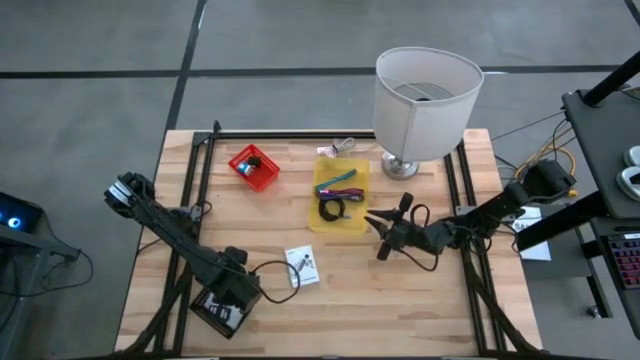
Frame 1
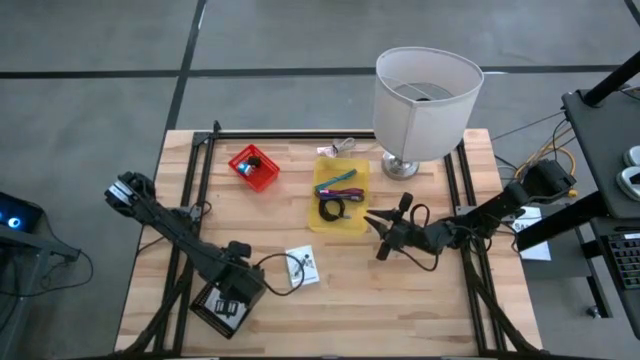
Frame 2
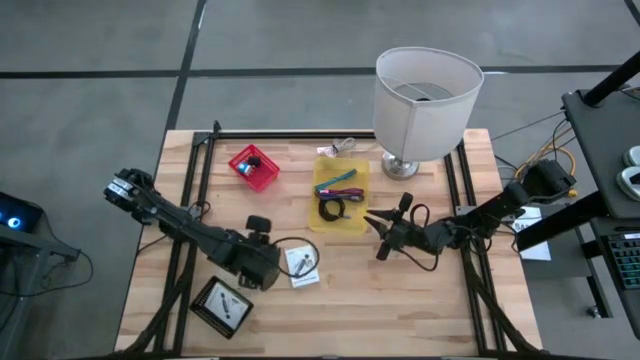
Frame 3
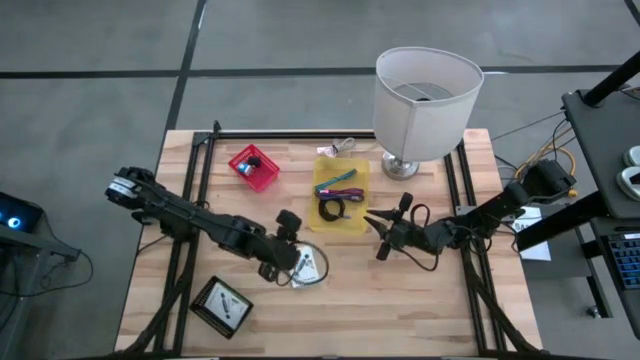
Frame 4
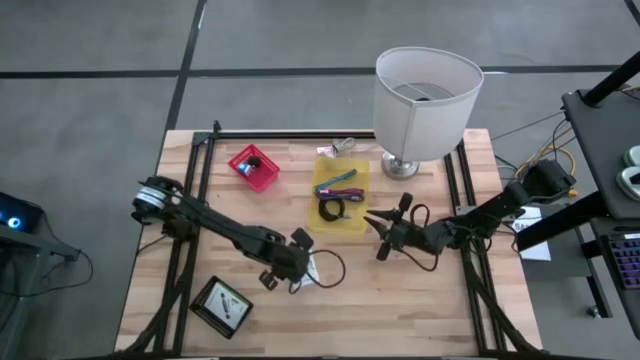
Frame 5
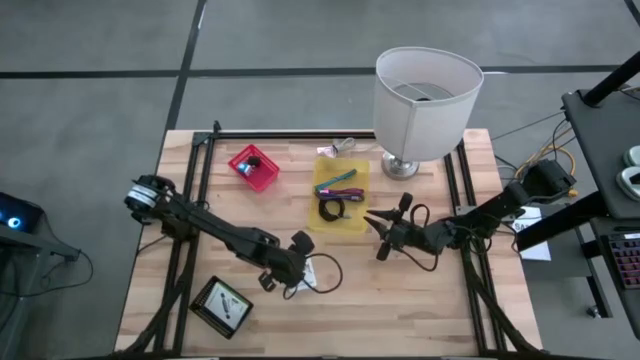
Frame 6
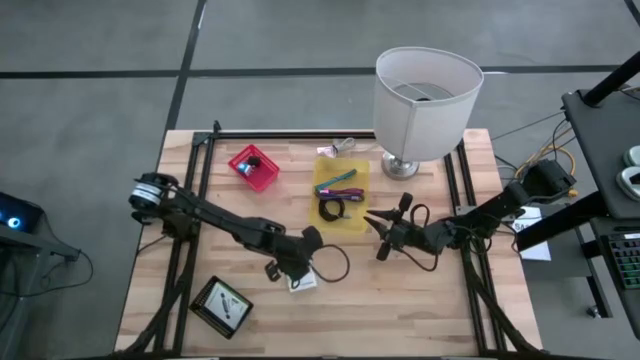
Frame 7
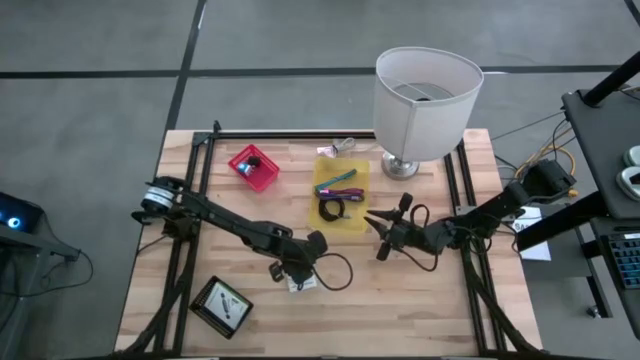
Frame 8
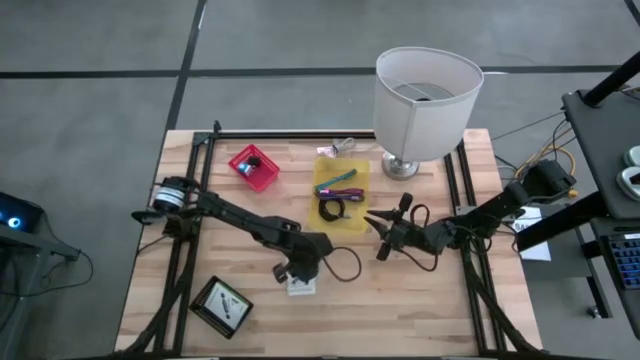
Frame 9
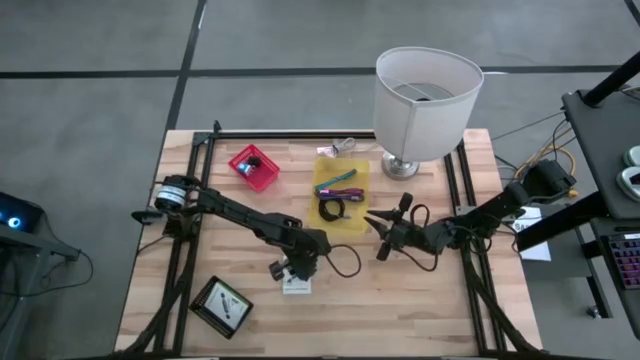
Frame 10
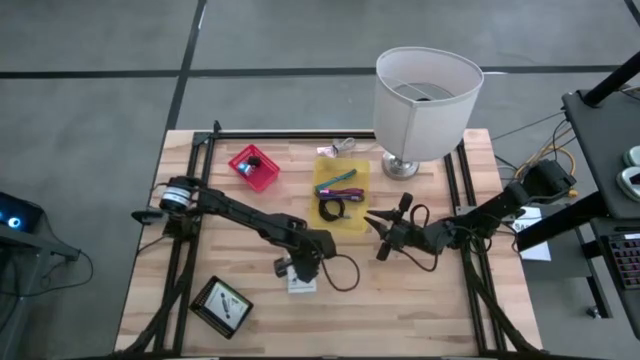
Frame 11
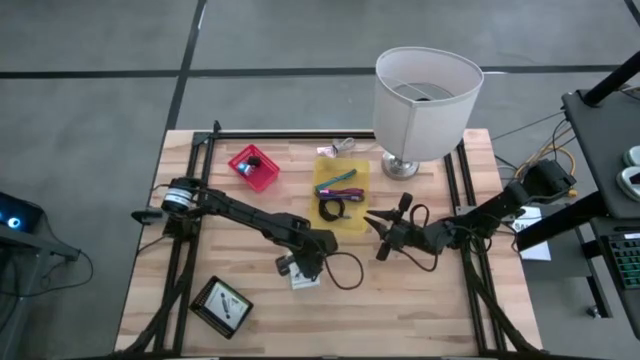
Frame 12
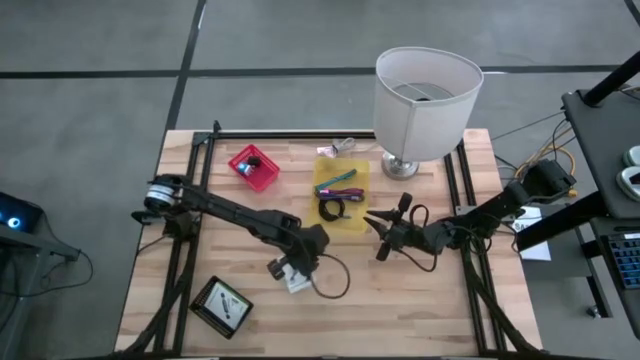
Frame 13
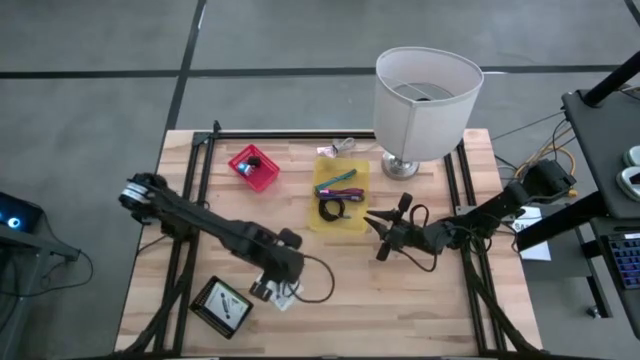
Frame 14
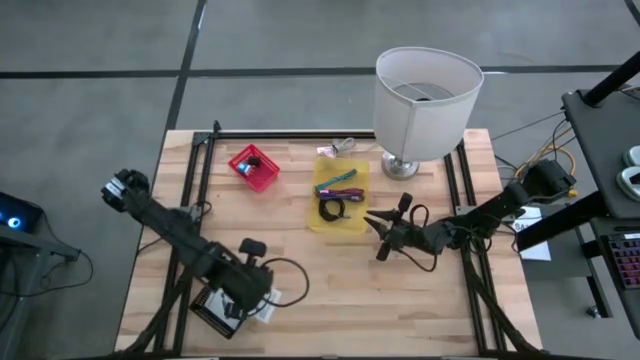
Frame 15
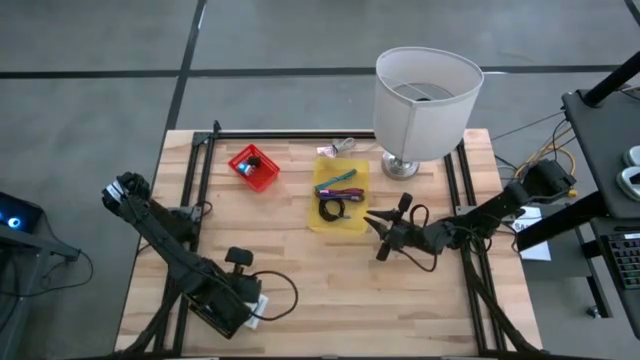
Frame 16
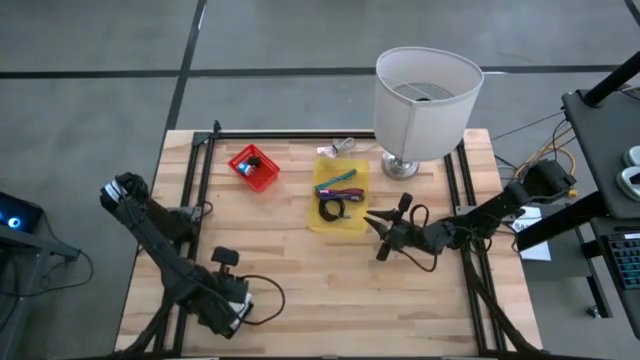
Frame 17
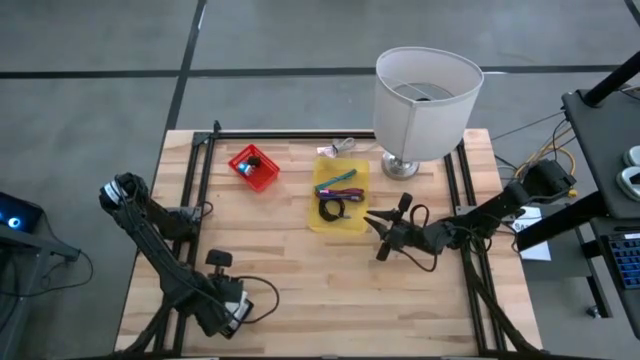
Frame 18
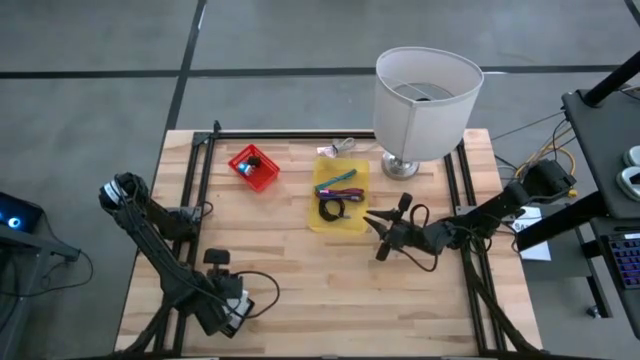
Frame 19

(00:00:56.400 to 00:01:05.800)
Task: Pick and place items into bin
Put the white card reader box into the black bin

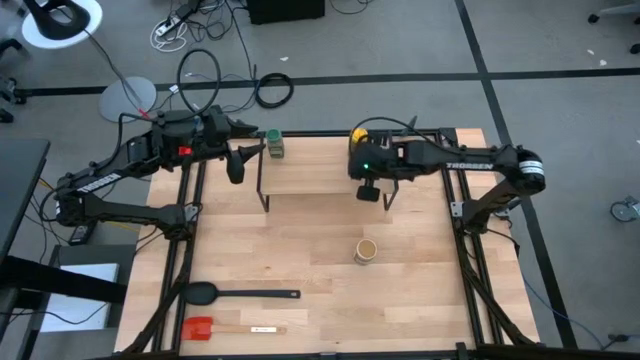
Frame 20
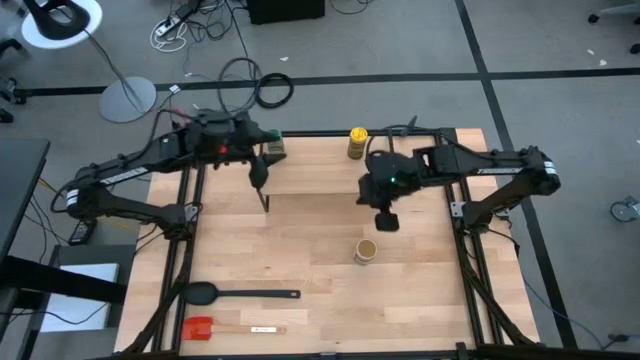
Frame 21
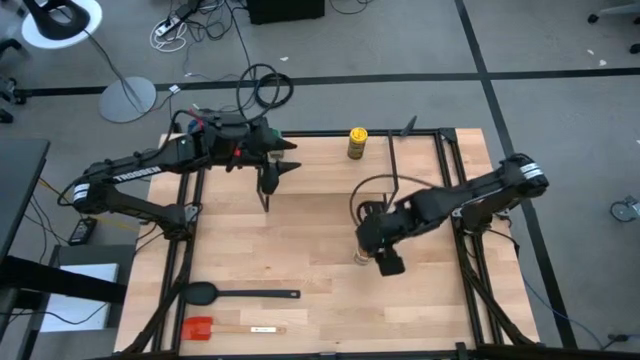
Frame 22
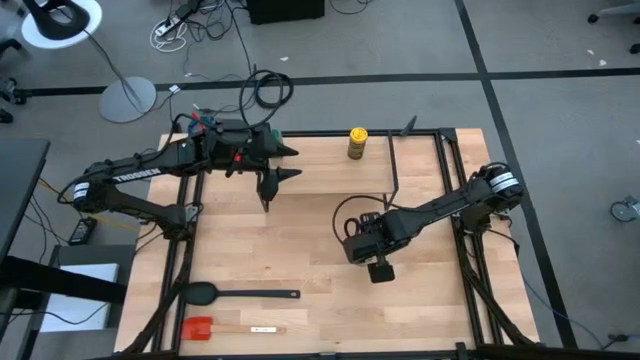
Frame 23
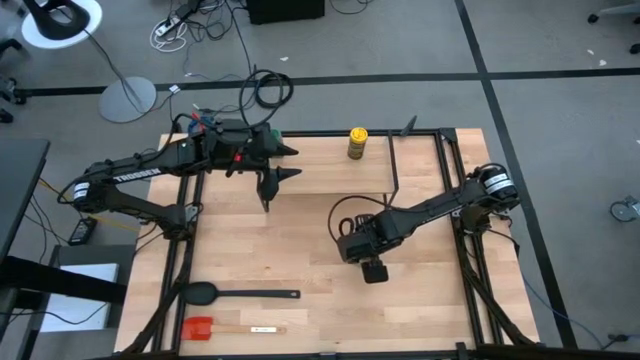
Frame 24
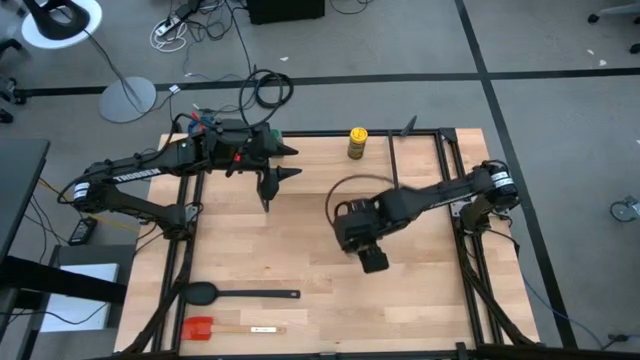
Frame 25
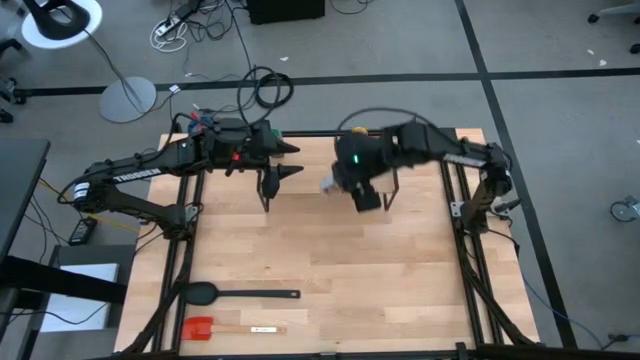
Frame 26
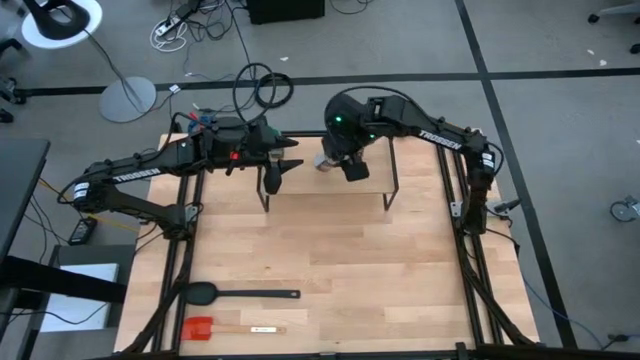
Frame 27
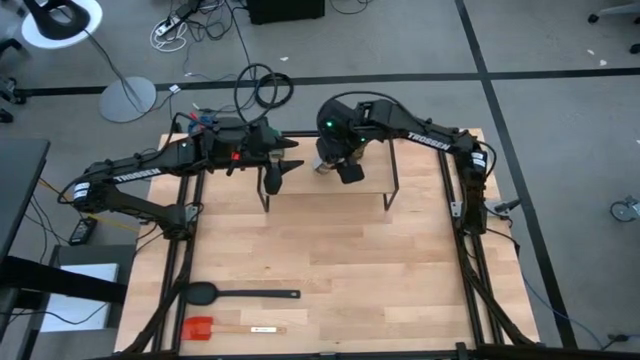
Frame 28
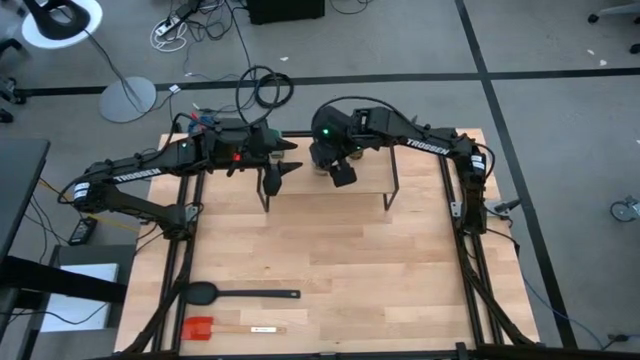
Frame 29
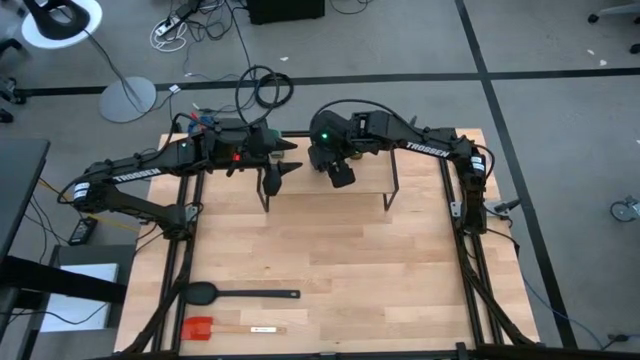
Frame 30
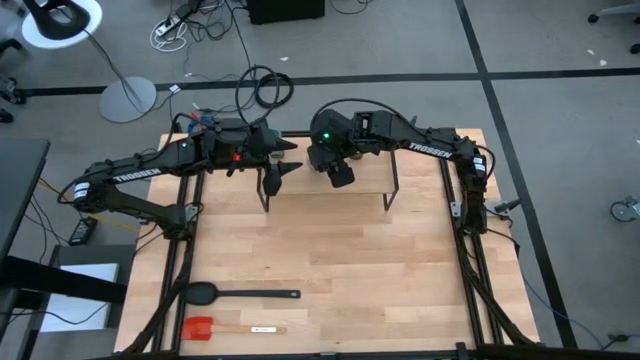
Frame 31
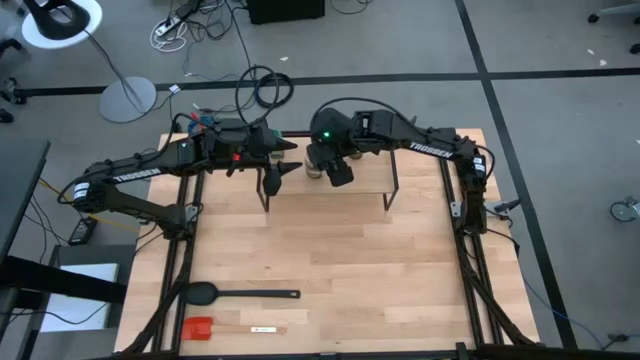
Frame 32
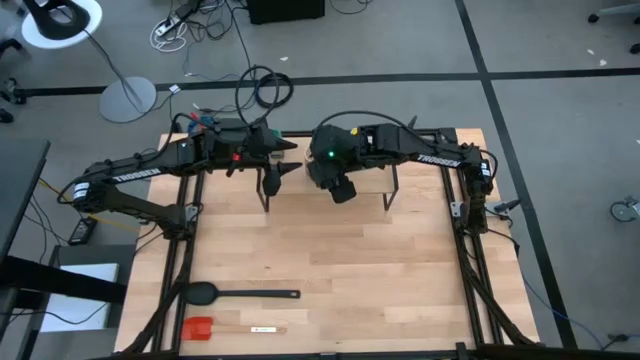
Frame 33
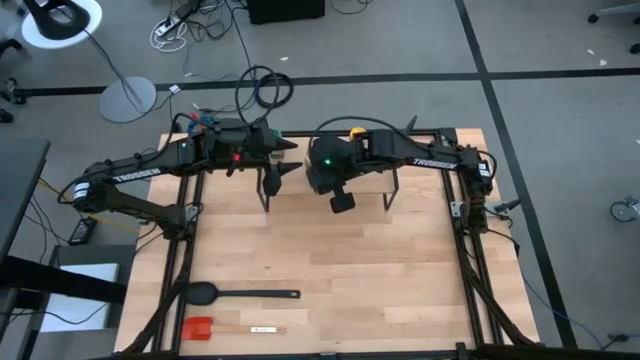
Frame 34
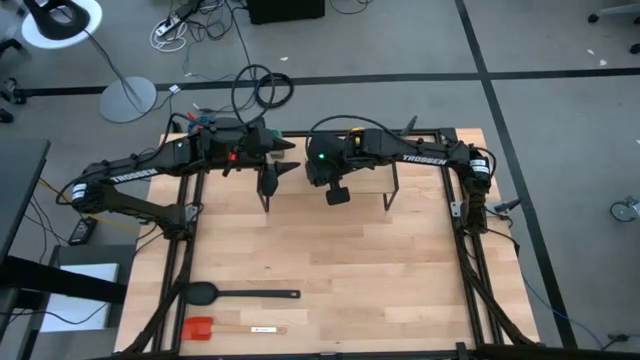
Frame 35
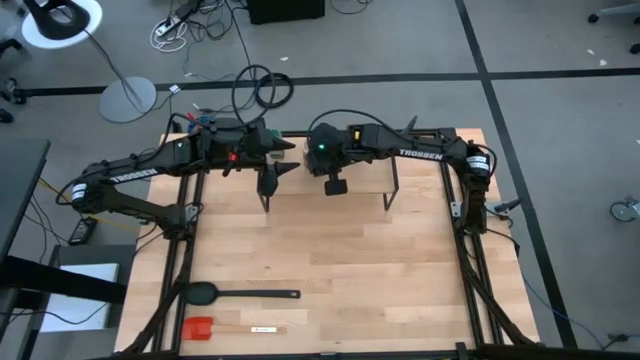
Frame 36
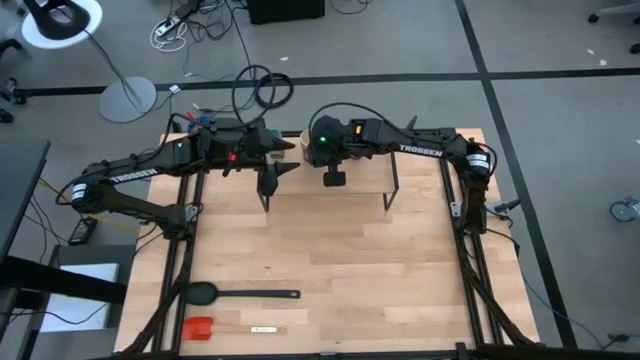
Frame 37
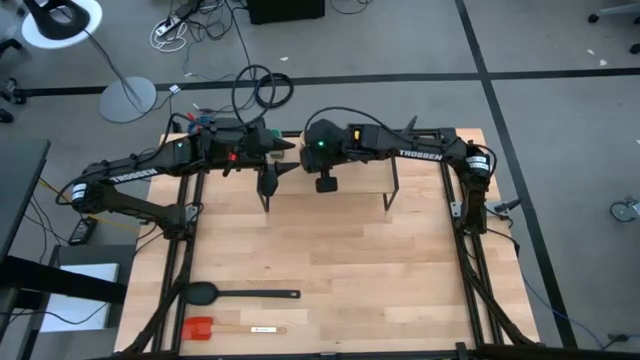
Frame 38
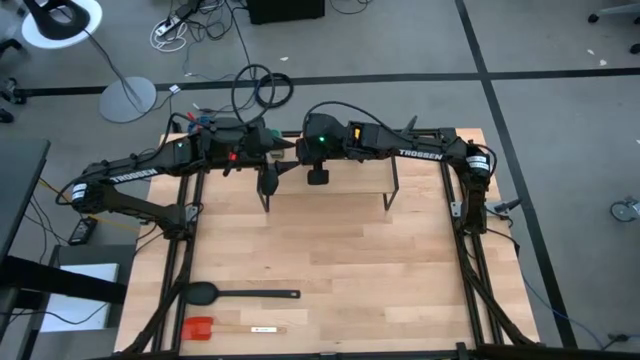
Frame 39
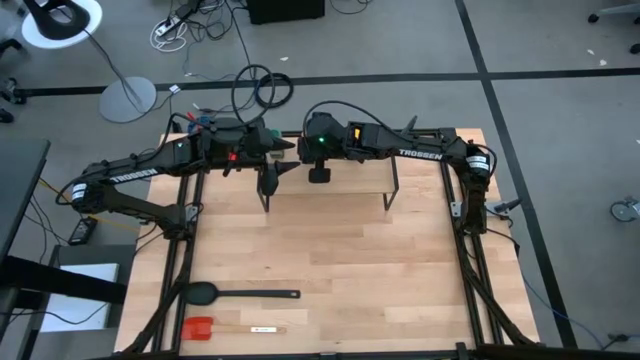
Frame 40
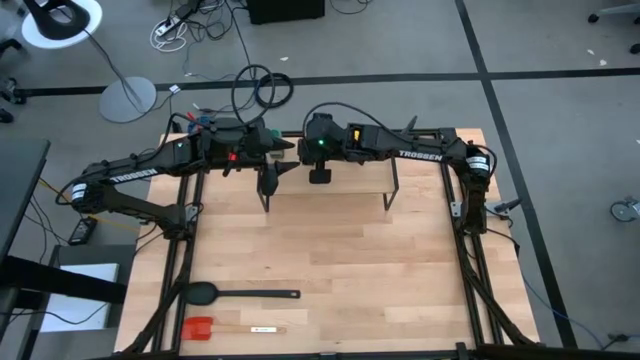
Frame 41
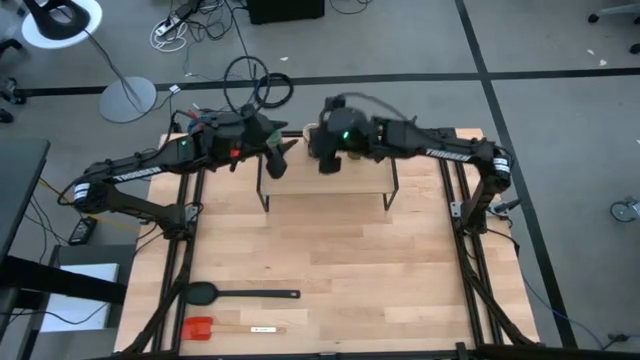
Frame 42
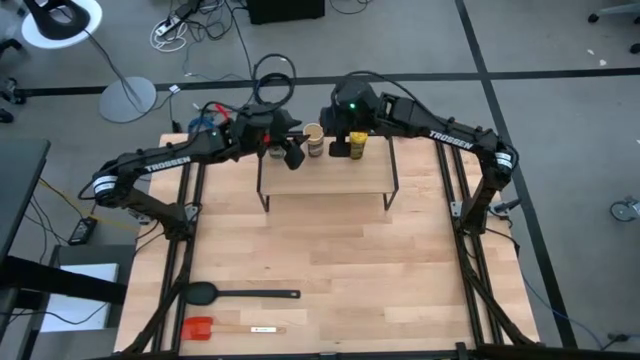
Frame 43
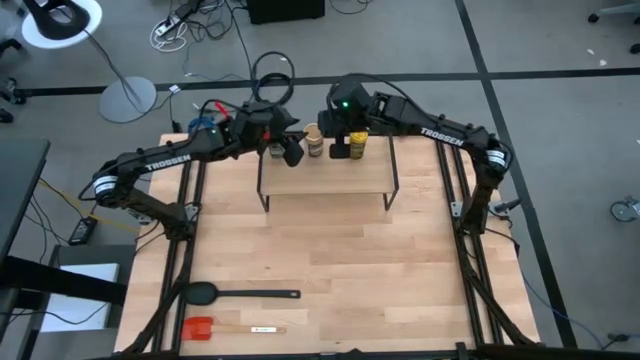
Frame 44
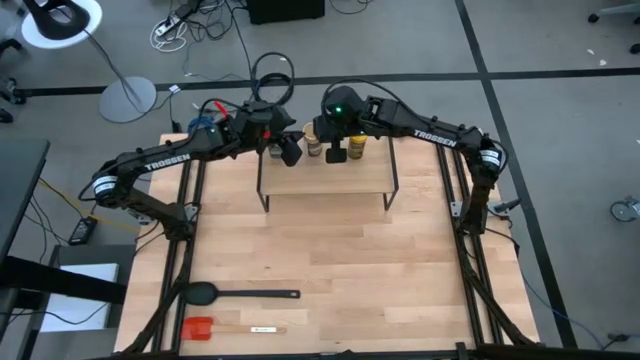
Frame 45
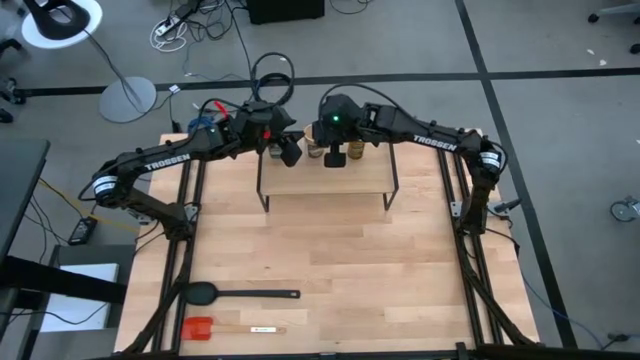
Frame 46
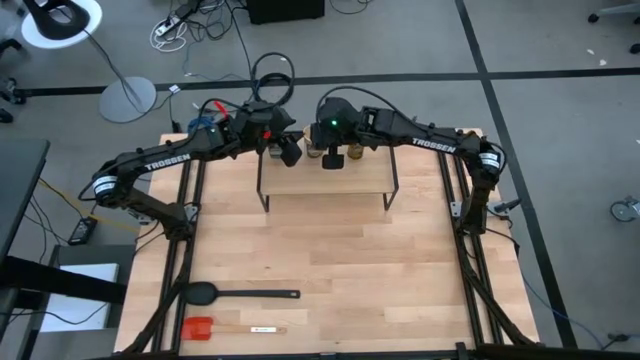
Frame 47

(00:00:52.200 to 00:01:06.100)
Task: Shelf spices
Put the brown seasoning bottle on the shelf
